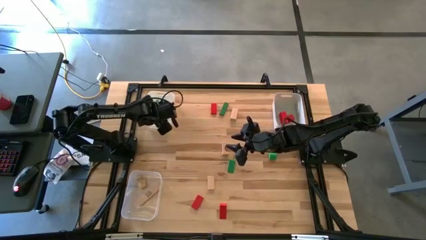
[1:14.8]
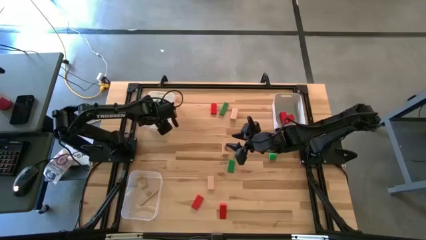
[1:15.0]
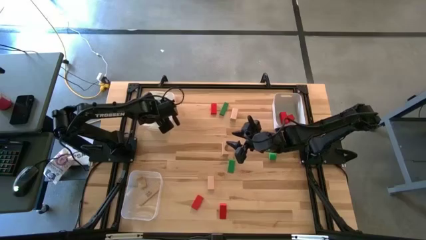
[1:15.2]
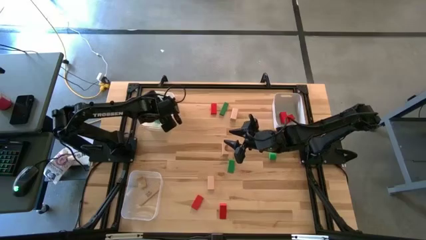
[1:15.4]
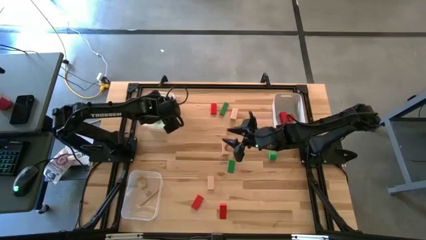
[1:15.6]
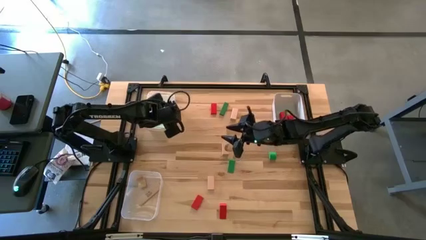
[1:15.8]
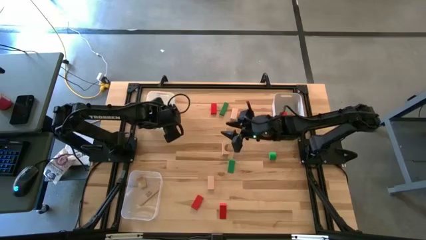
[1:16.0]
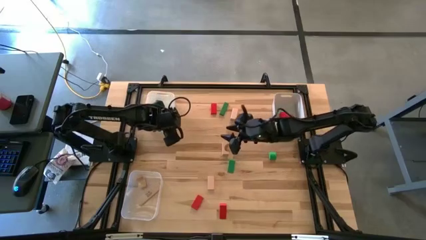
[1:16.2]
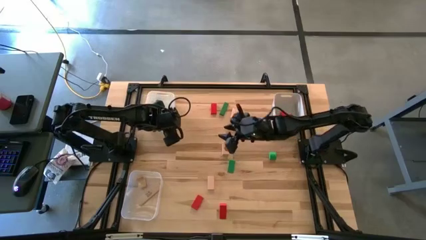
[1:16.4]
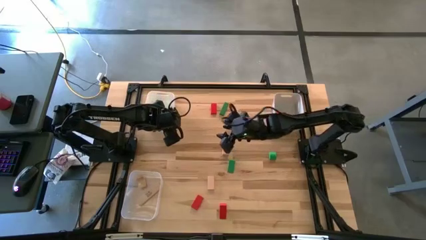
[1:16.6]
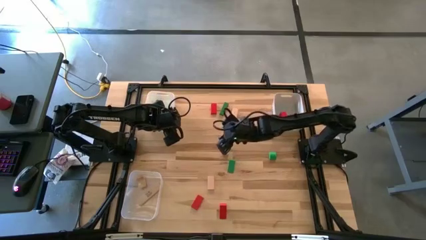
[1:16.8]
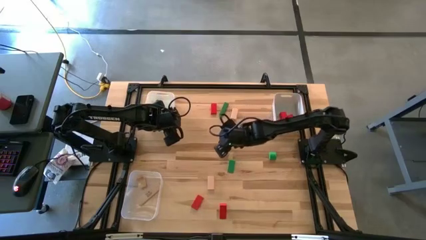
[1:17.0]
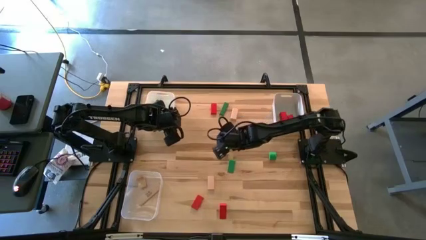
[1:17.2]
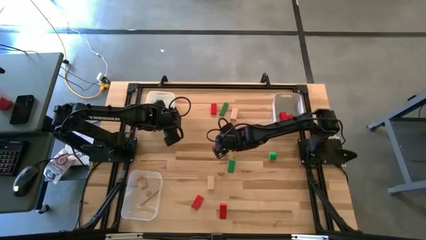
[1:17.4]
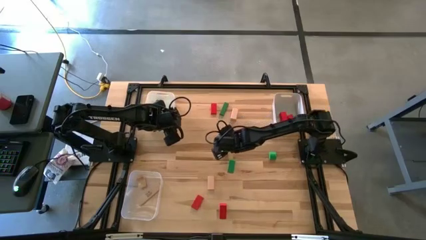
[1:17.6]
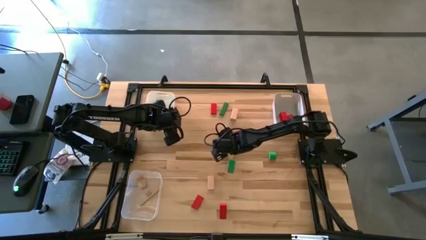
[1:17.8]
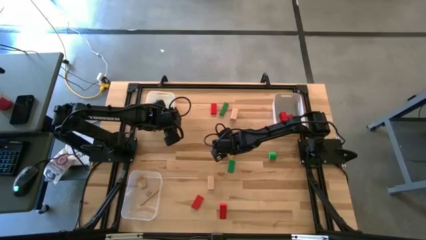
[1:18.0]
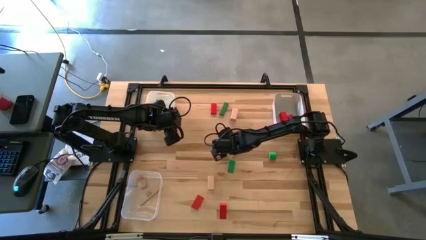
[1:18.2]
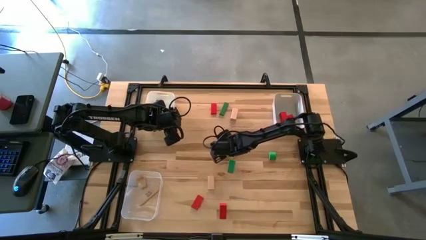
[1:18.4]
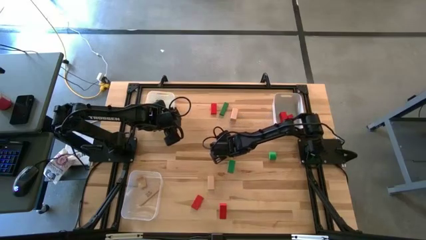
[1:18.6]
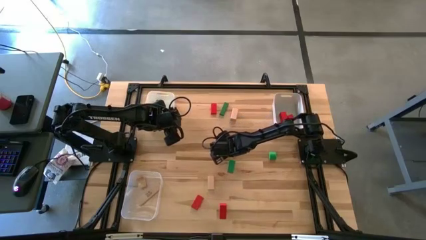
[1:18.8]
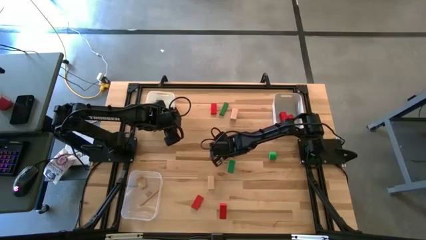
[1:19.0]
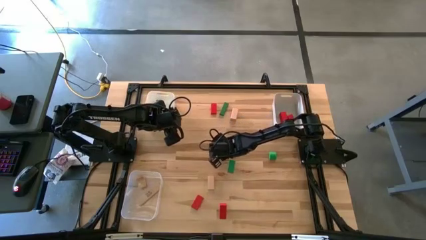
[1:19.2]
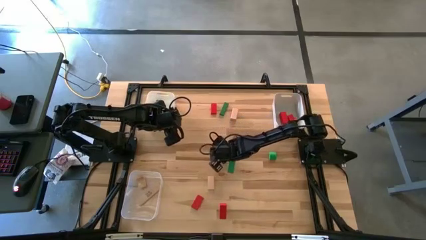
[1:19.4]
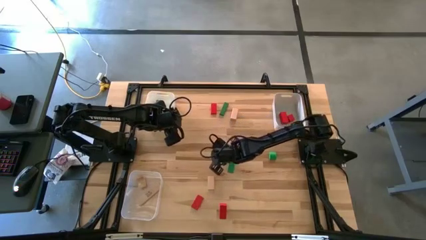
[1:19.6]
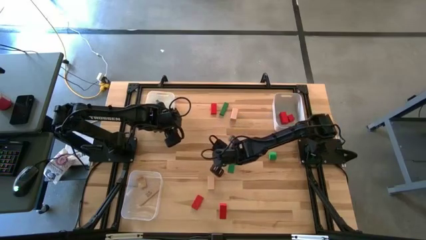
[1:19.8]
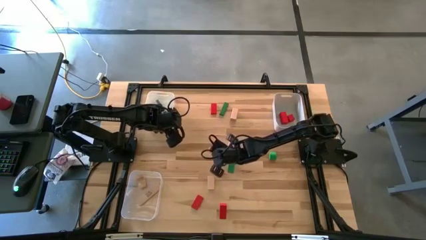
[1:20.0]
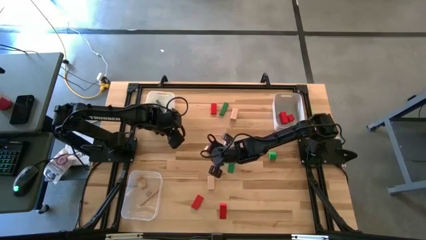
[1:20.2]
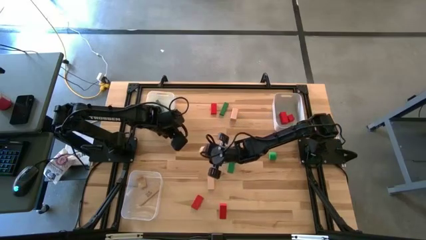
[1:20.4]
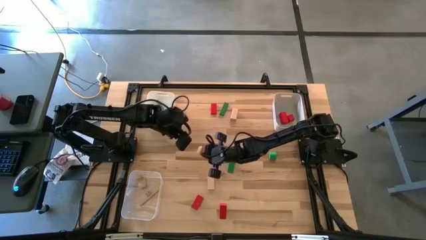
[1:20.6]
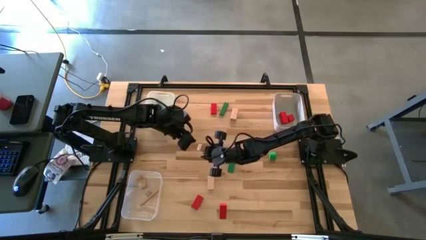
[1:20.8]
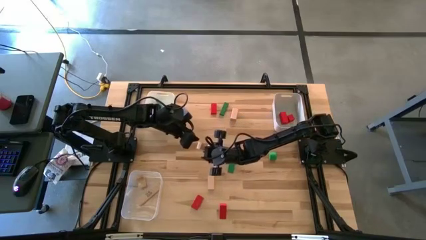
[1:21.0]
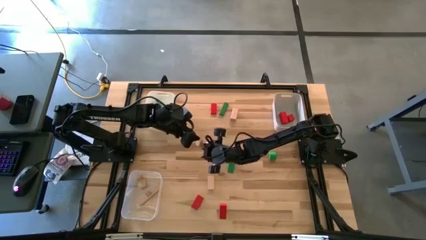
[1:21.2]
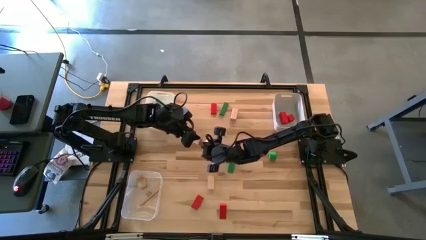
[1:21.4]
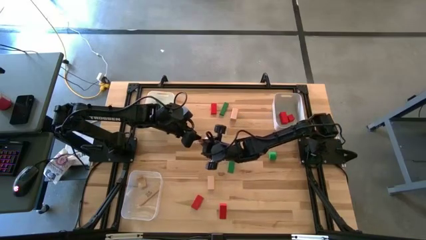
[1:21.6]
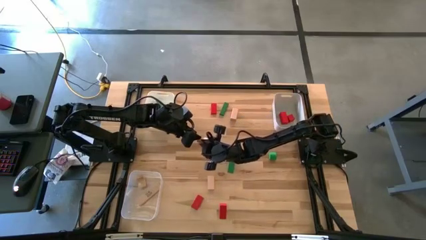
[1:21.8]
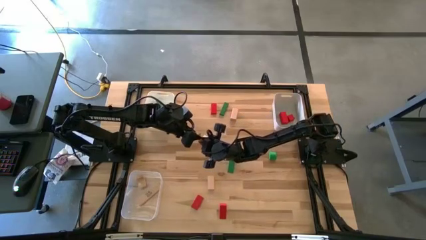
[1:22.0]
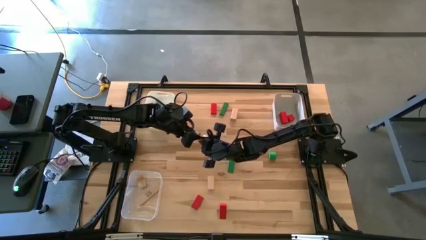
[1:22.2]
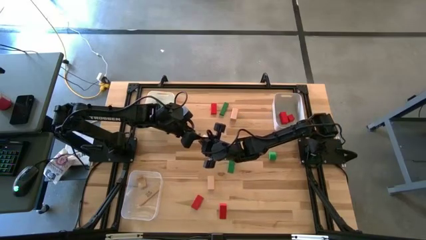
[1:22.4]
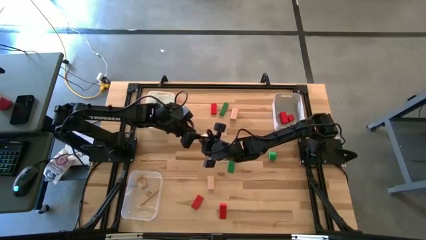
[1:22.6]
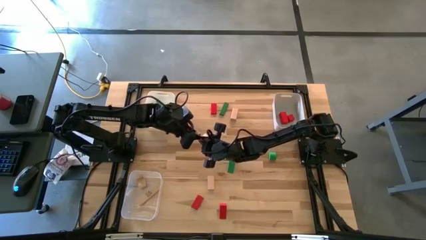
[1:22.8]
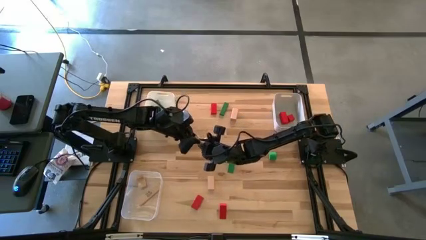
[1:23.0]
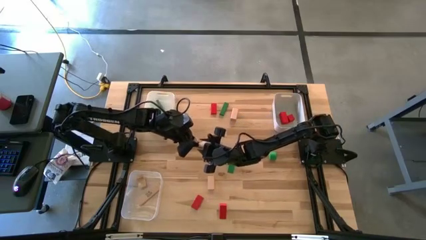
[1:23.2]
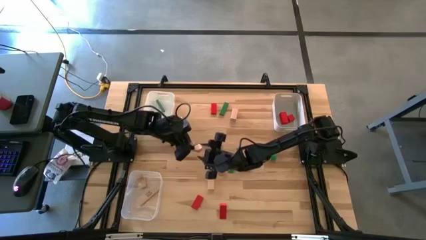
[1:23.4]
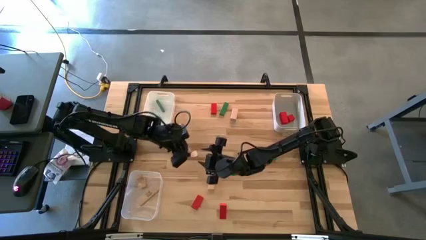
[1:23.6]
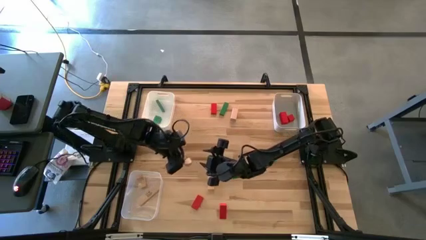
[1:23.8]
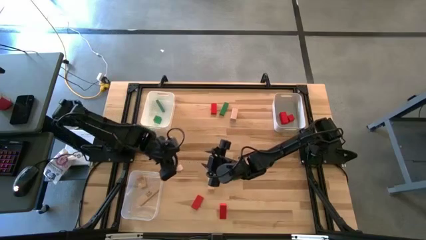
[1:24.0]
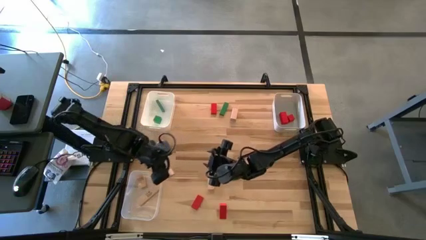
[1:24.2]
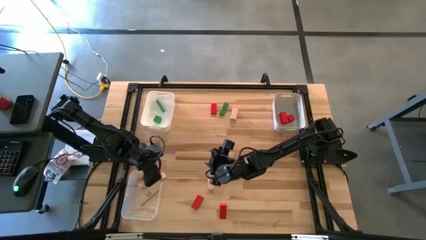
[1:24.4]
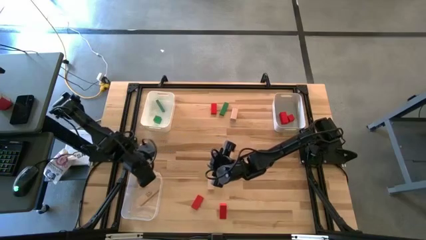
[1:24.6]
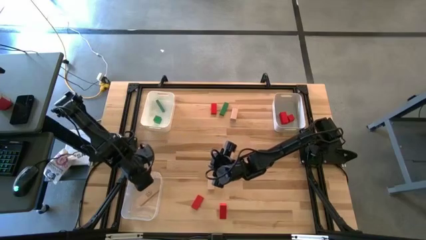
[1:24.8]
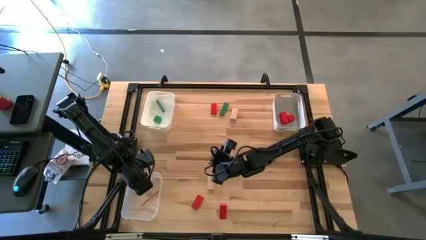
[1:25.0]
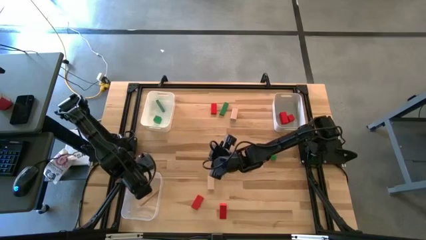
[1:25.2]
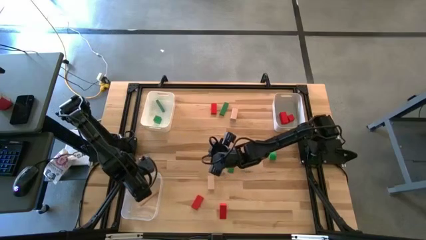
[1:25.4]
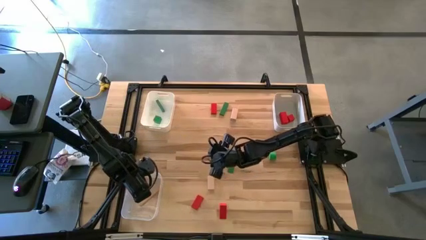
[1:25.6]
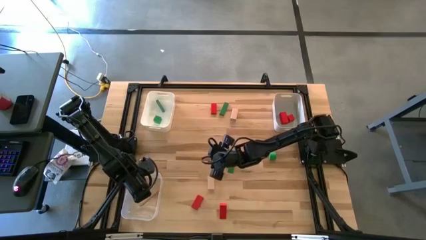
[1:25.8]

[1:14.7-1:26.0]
Task: Sort & place blocks by color
Put the brown block into the transparent bin
